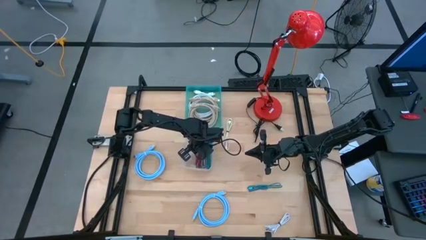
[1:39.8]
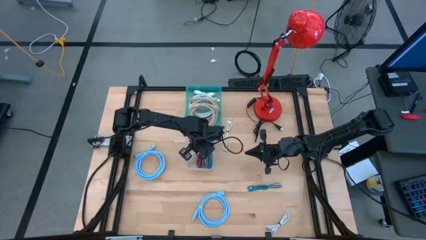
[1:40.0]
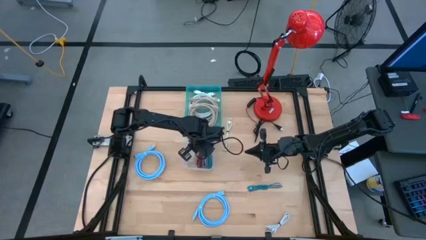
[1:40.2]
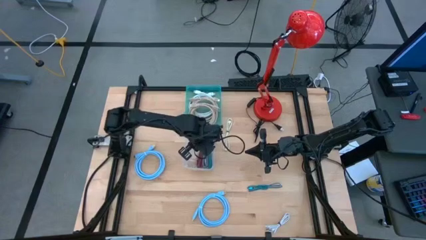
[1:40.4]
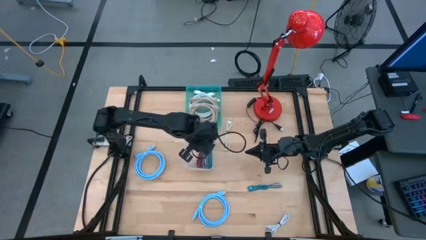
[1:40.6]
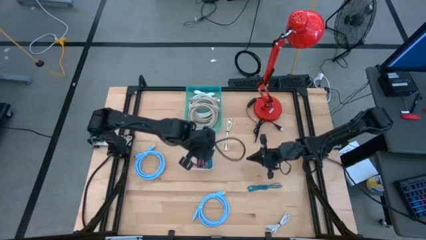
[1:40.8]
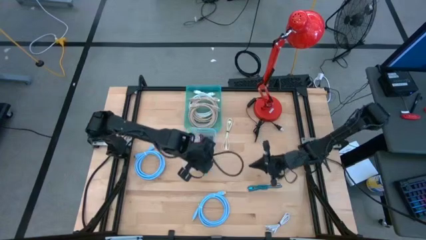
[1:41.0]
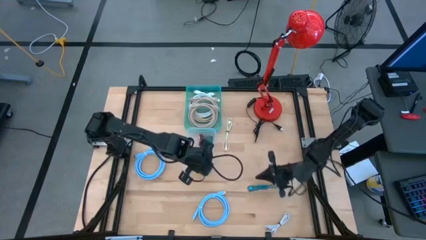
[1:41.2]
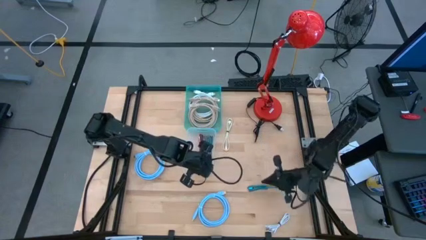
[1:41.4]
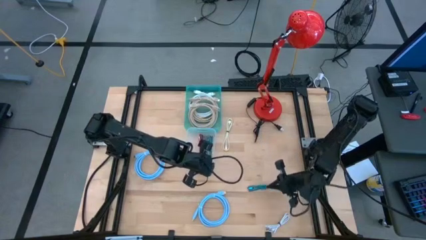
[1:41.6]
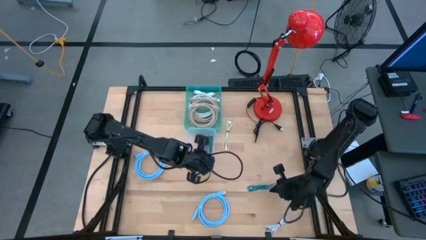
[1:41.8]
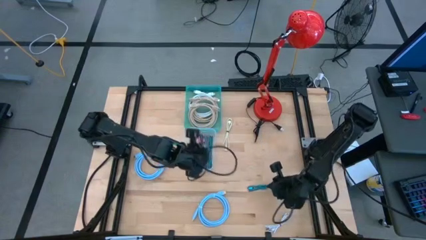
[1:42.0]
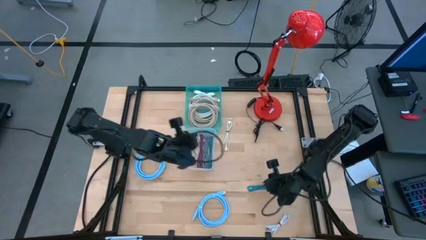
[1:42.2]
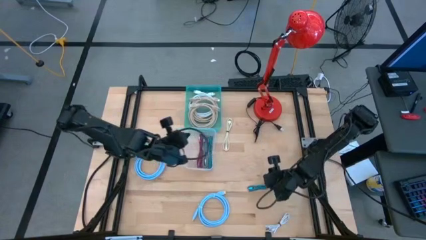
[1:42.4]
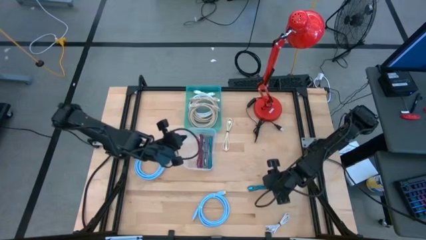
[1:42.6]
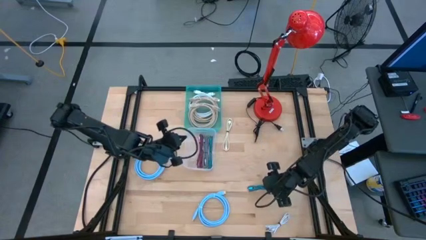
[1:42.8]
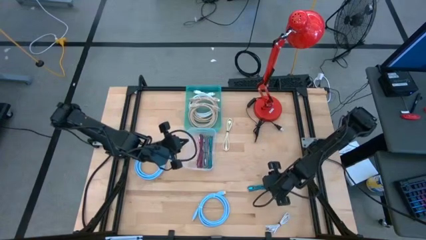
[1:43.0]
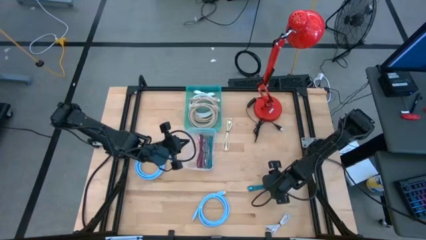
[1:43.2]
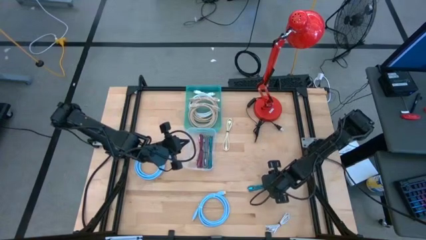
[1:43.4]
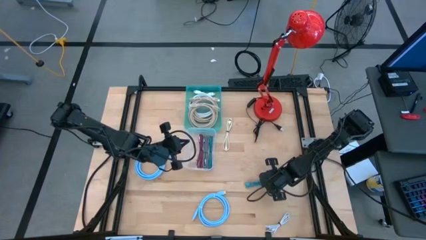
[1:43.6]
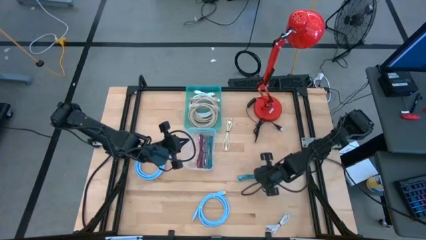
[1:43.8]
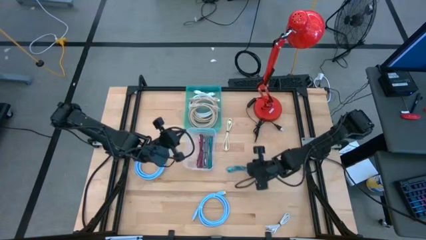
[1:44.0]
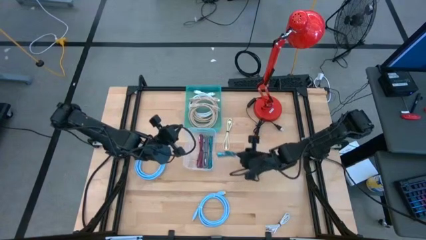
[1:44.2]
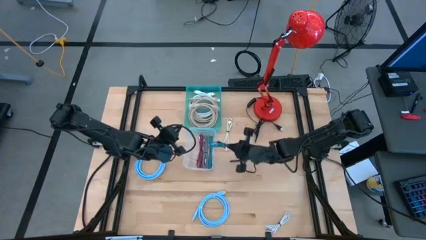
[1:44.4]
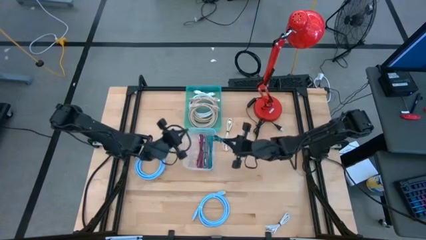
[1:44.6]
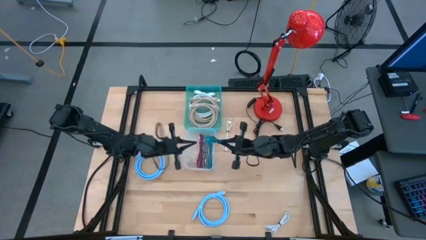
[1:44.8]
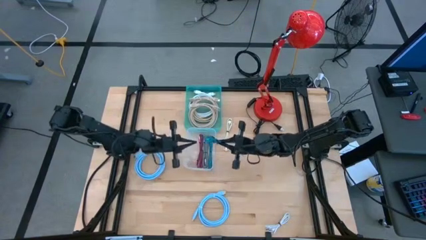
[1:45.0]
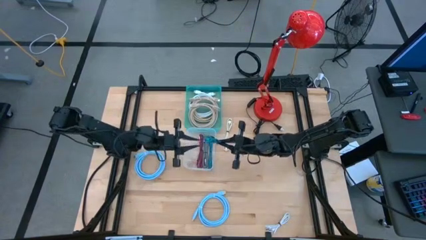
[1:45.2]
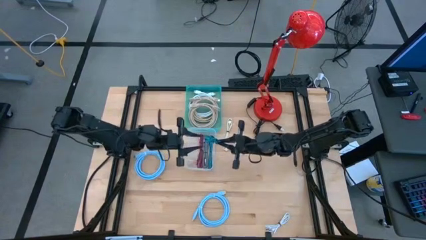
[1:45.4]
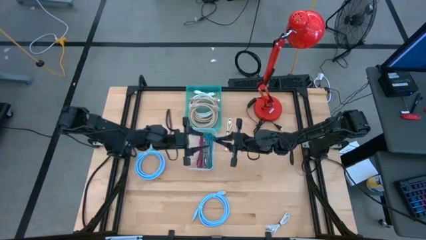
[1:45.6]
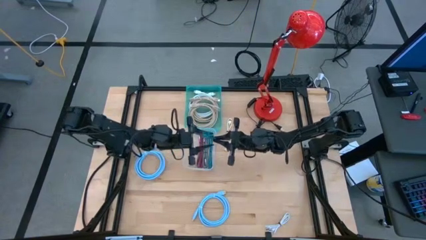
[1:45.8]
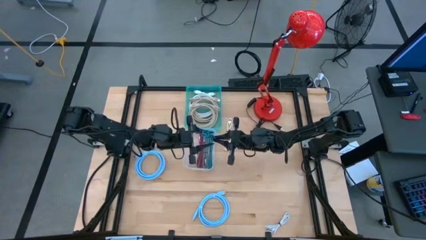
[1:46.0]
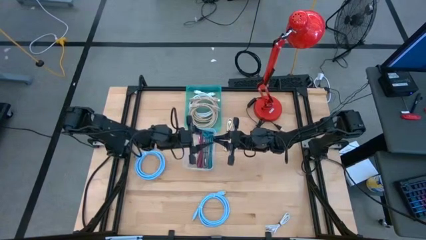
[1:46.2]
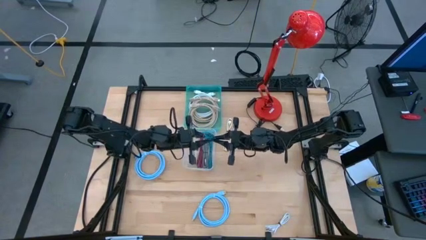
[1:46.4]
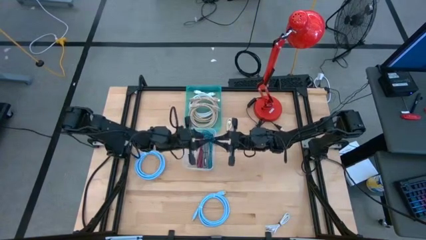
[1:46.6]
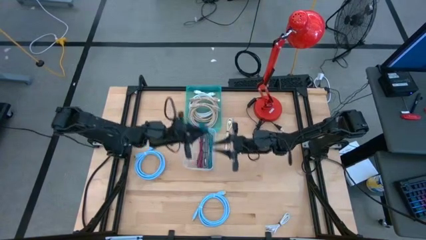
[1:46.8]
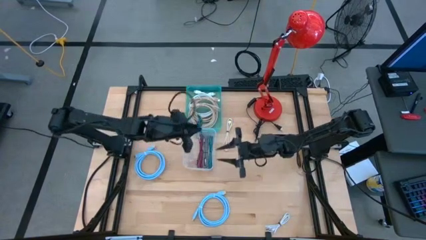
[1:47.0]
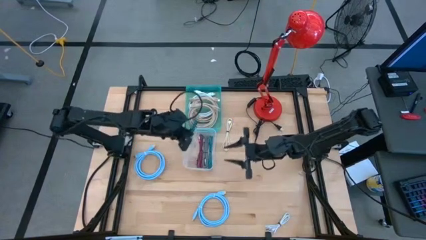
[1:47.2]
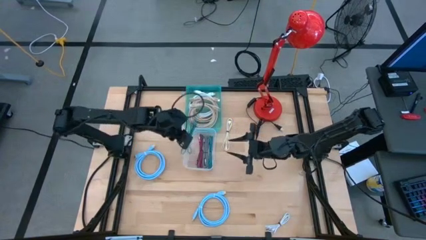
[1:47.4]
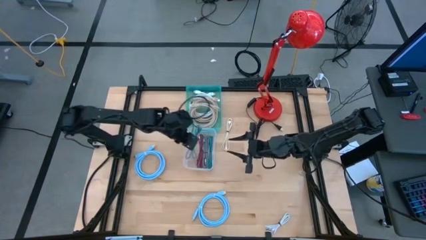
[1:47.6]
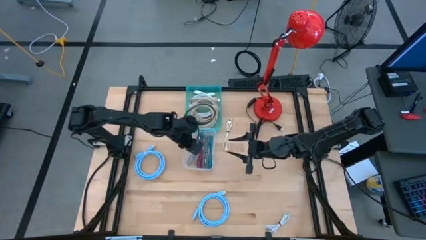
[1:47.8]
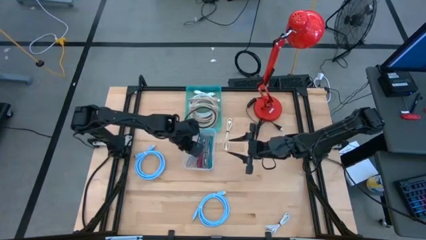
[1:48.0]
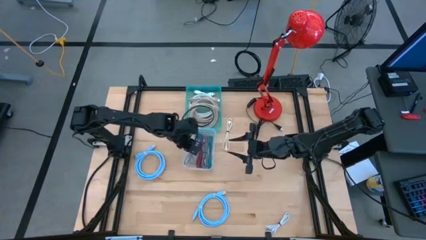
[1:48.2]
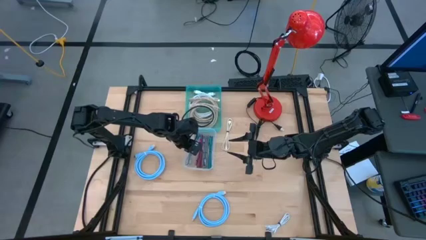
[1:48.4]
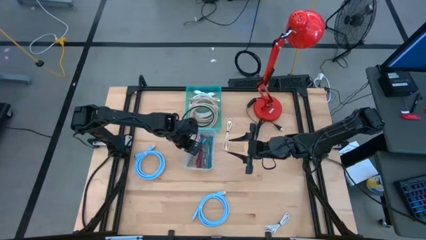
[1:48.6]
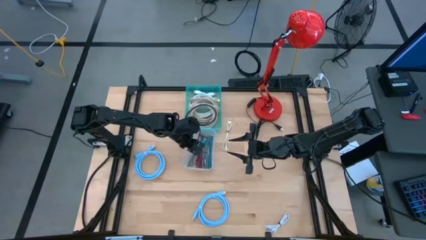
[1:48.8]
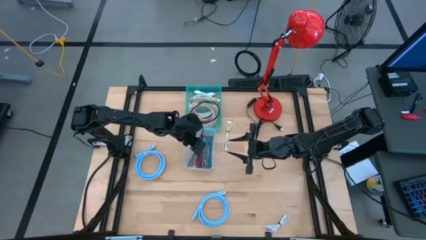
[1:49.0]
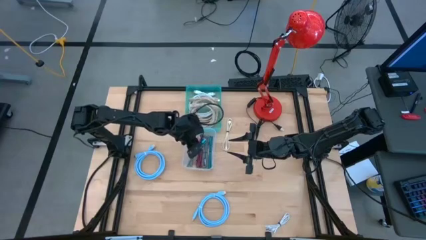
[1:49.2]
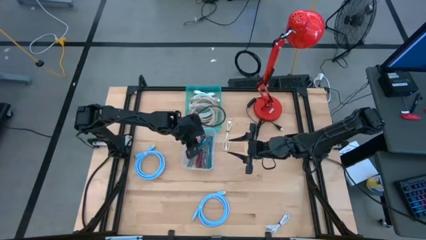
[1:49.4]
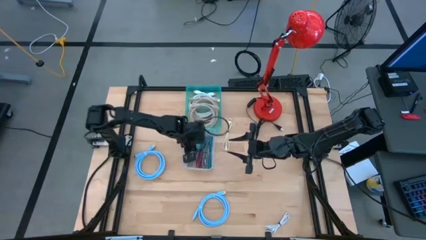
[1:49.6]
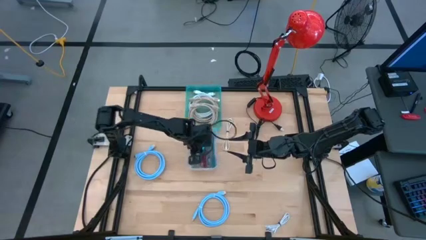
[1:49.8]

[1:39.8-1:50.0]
Task: Pick & Place USB Port
Put the blue black tied USB cable into the transparent bin

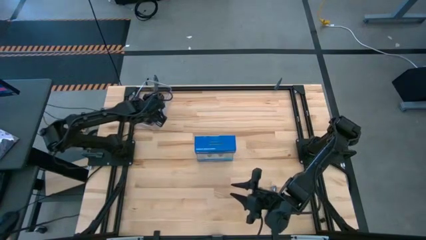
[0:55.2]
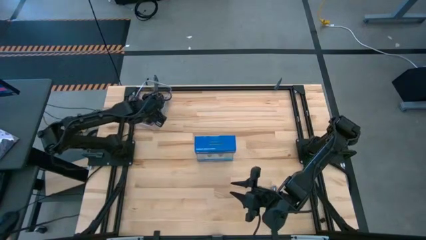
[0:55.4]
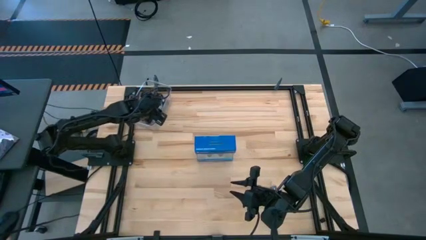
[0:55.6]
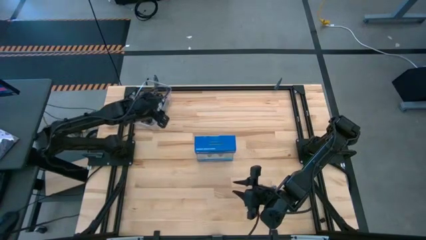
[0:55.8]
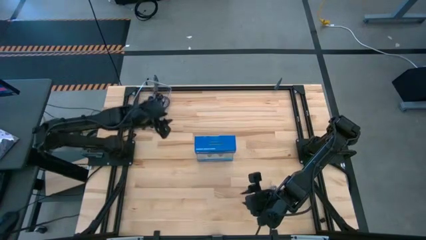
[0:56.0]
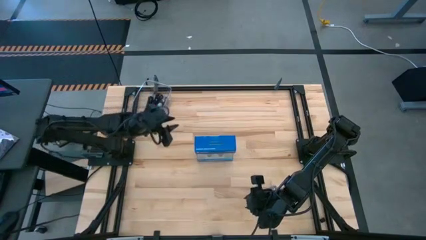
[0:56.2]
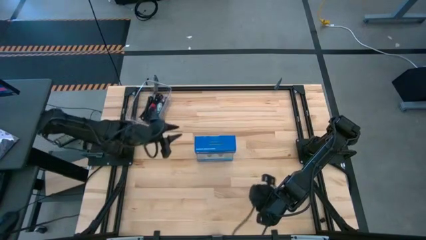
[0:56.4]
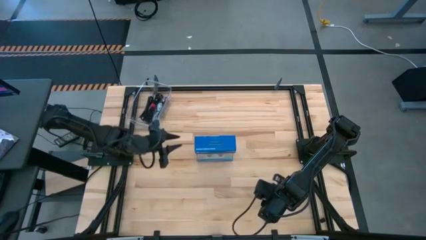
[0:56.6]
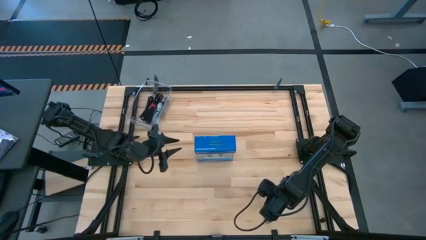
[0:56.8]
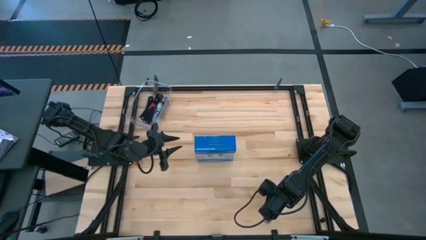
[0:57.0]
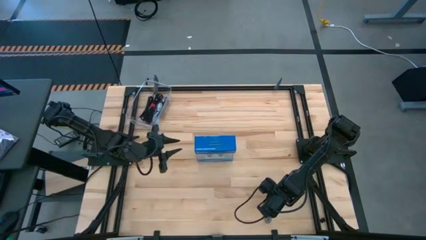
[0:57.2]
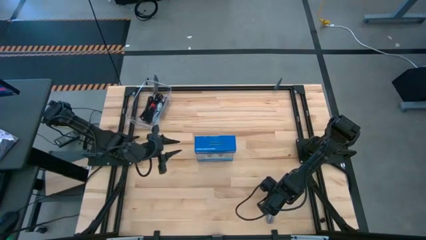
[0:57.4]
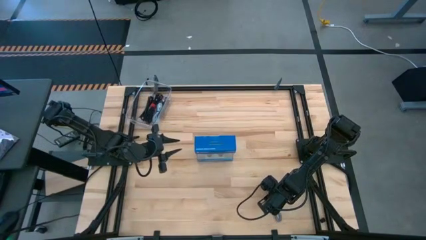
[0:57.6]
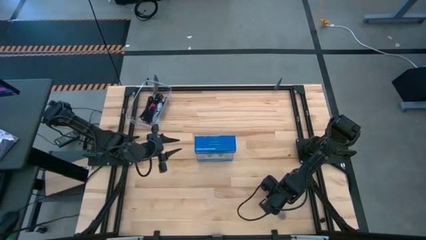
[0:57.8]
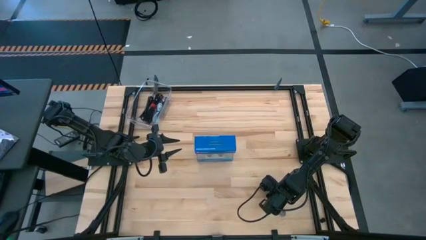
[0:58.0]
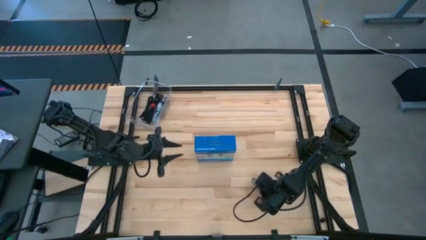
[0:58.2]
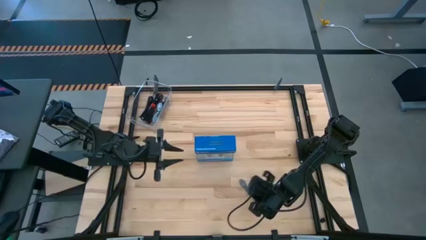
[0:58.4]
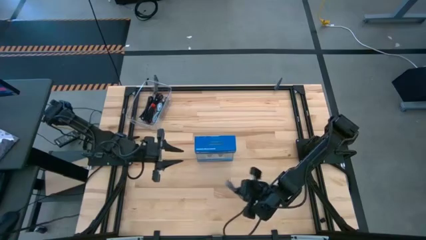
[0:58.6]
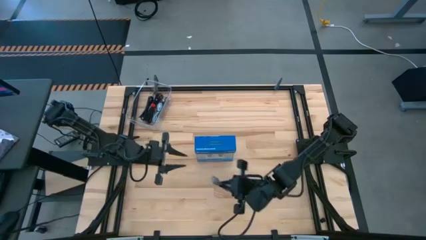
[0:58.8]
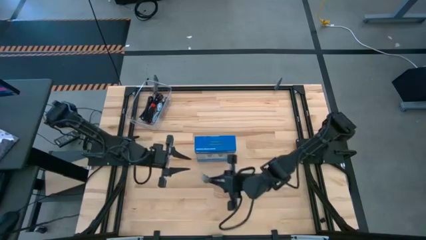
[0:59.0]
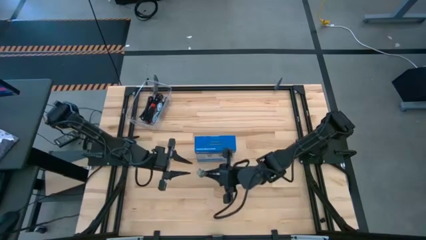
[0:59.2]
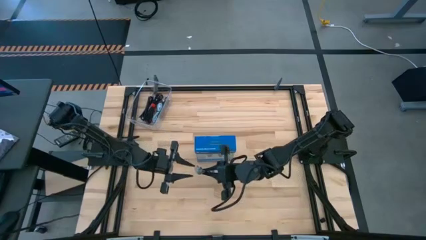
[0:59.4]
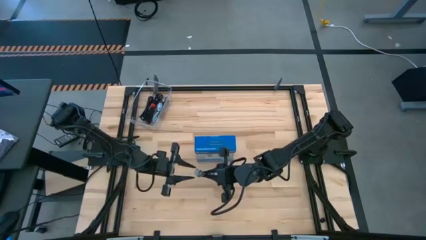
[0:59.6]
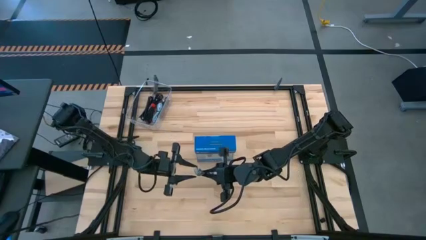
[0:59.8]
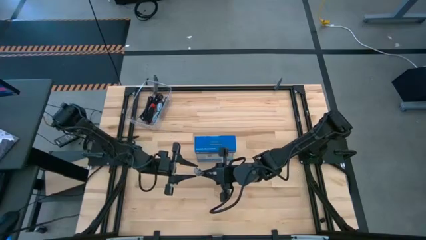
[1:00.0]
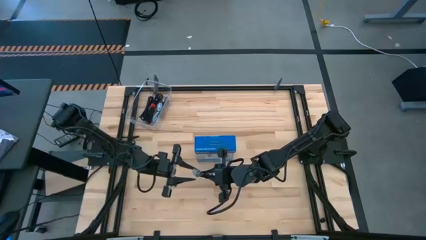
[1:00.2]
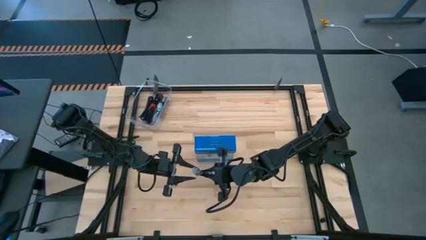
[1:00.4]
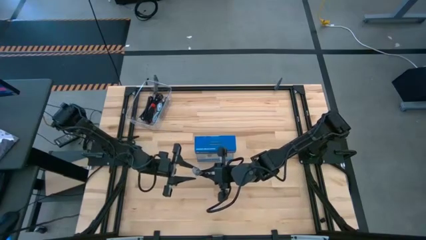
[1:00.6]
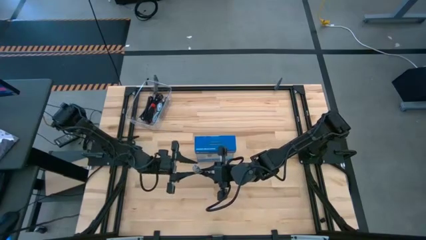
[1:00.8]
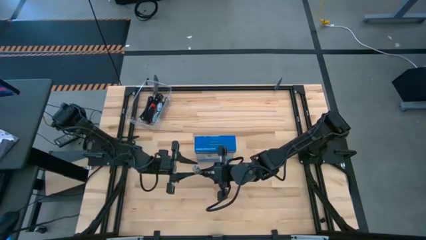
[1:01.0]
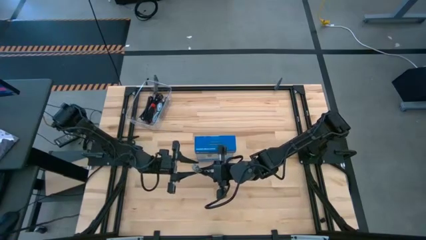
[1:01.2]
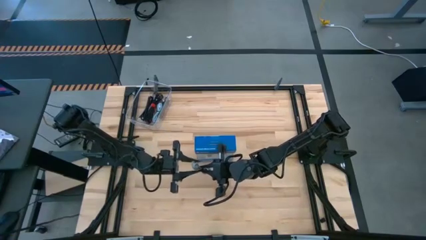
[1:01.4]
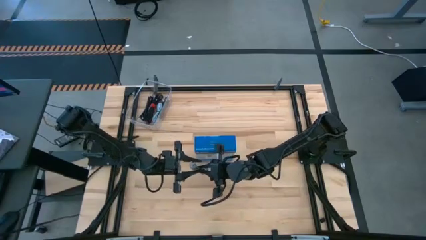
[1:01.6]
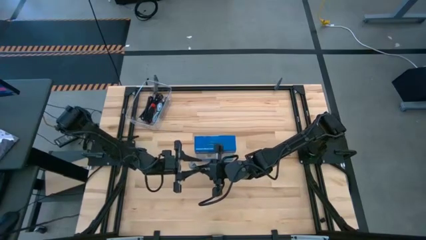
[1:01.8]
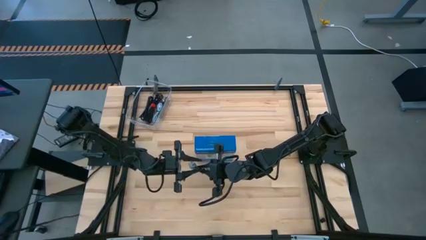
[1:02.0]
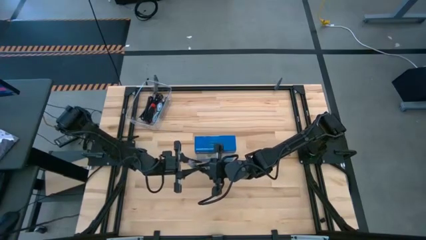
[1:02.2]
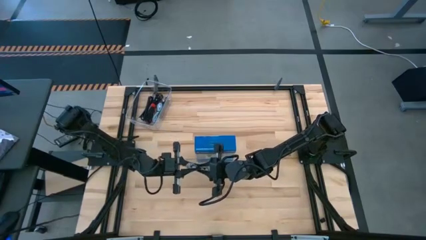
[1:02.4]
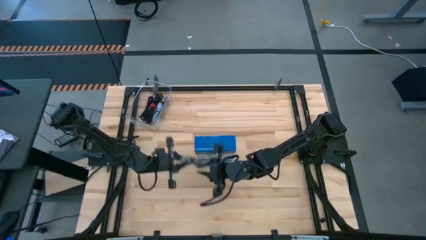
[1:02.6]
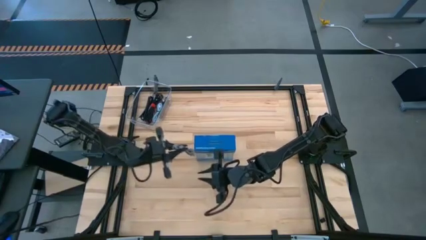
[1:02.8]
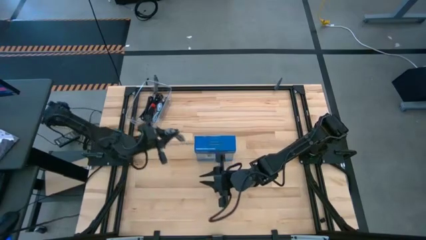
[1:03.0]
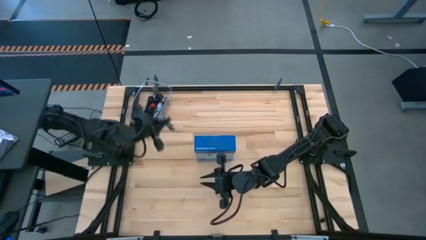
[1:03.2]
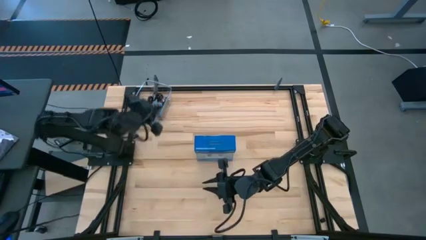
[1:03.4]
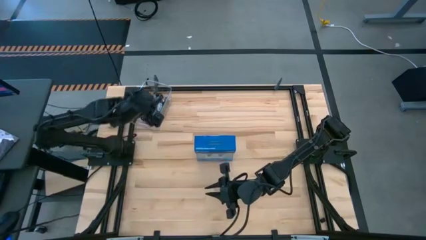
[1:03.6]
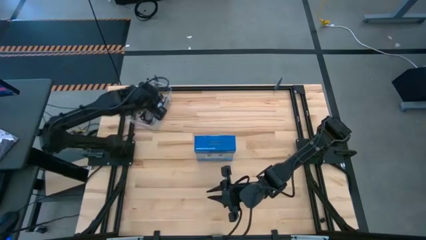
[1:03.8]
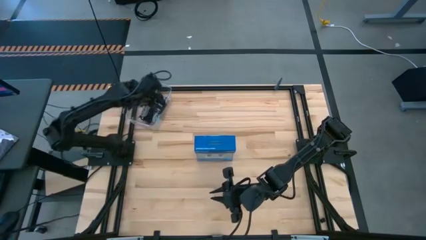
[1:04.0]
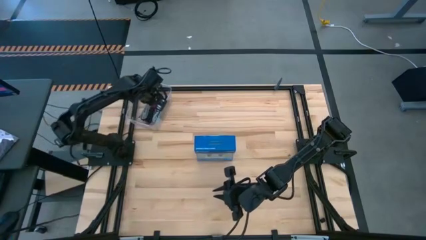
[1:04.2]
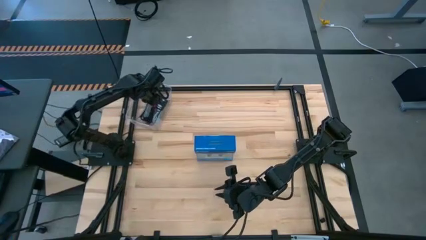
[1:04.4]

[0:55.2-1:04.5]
Task: Pick and place USB-C Cables
Put the white charger cable into the transparent bin
